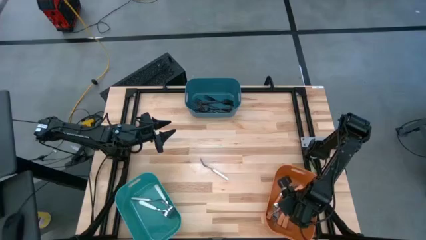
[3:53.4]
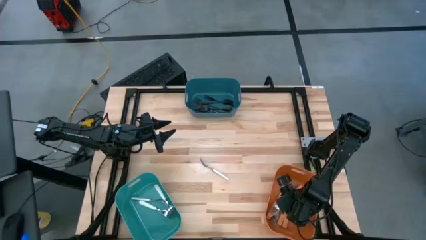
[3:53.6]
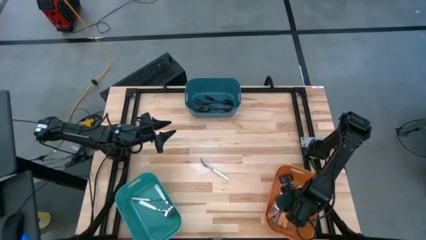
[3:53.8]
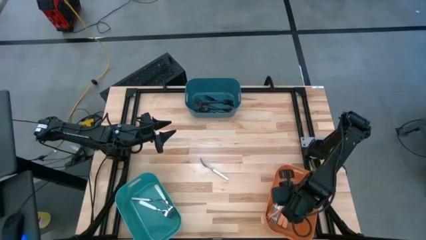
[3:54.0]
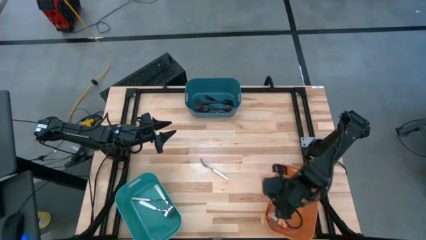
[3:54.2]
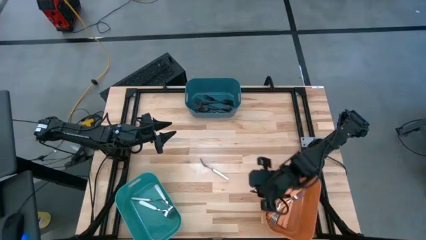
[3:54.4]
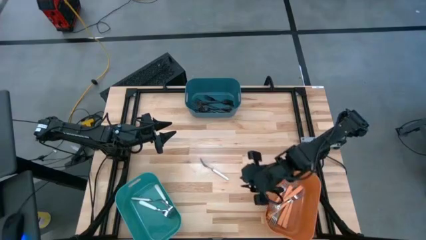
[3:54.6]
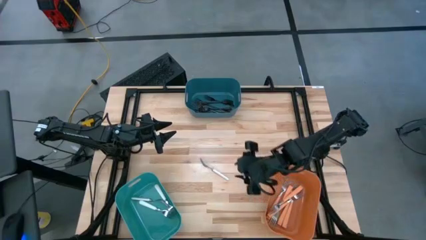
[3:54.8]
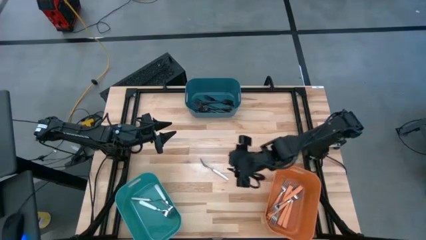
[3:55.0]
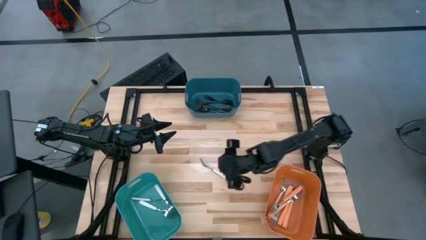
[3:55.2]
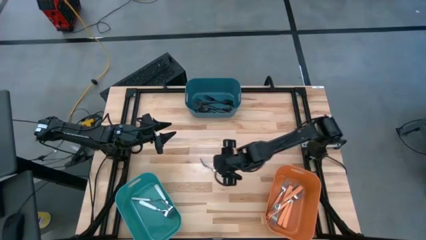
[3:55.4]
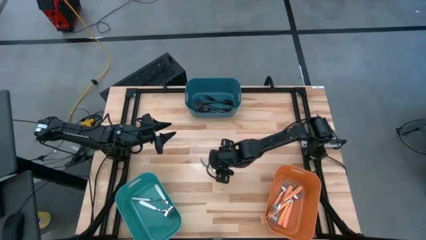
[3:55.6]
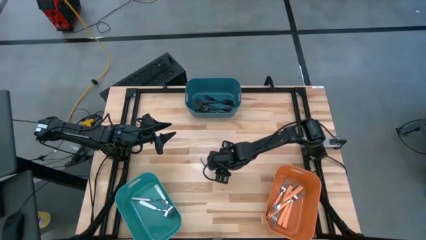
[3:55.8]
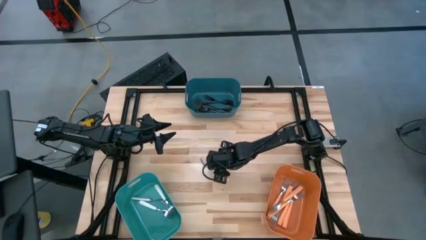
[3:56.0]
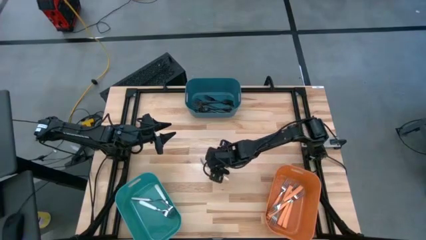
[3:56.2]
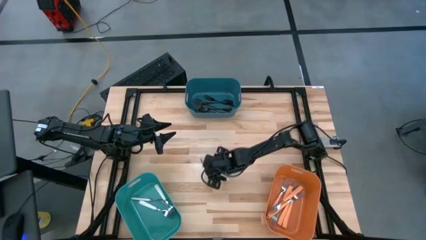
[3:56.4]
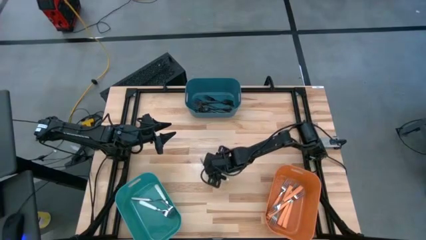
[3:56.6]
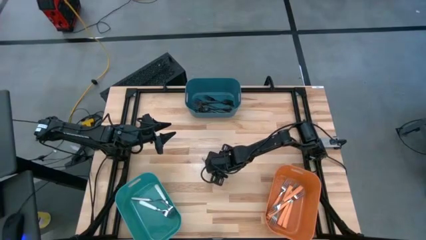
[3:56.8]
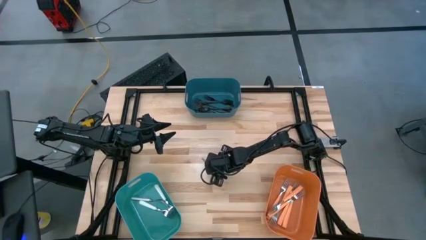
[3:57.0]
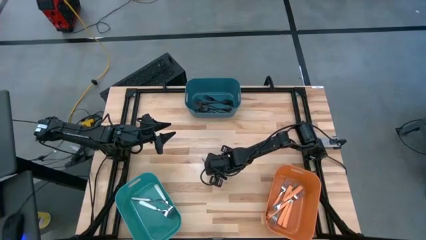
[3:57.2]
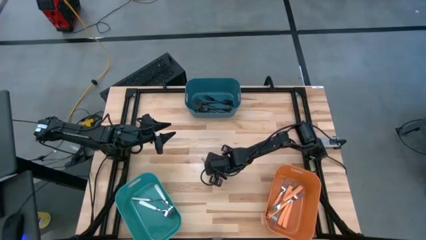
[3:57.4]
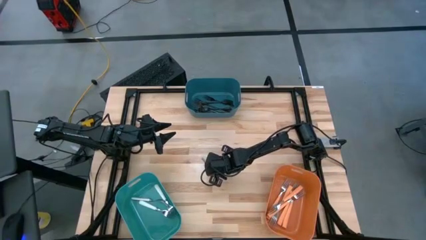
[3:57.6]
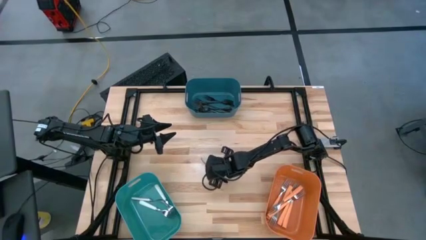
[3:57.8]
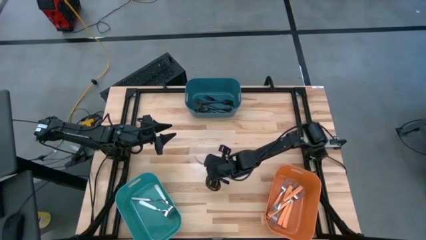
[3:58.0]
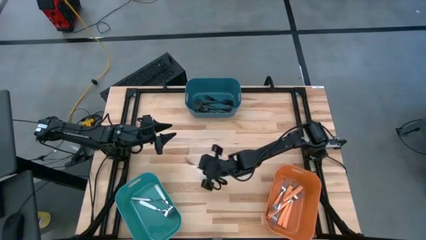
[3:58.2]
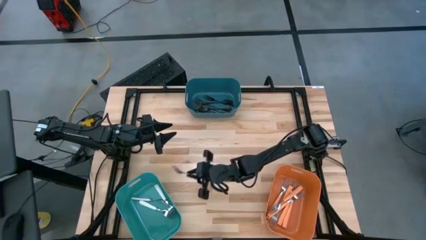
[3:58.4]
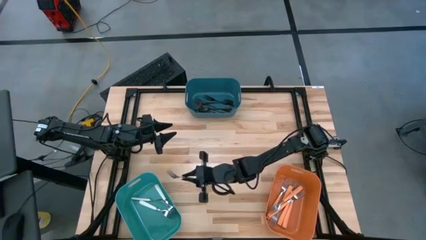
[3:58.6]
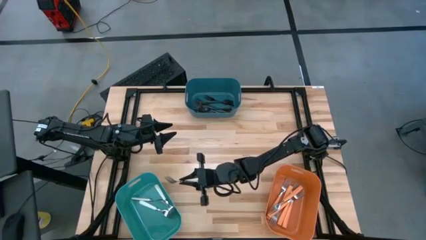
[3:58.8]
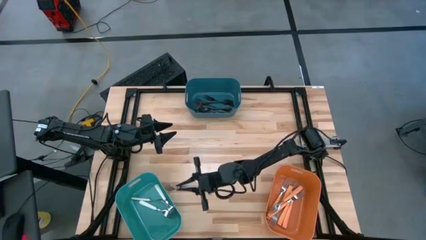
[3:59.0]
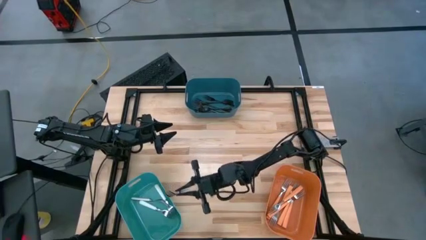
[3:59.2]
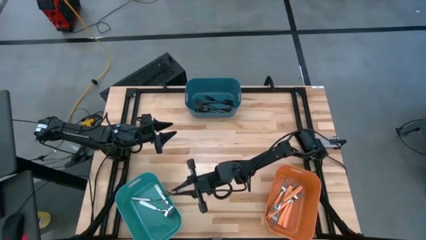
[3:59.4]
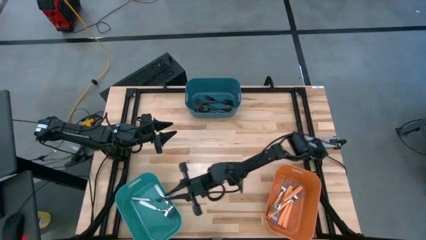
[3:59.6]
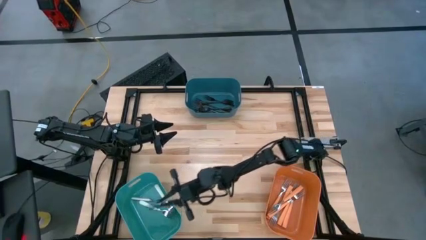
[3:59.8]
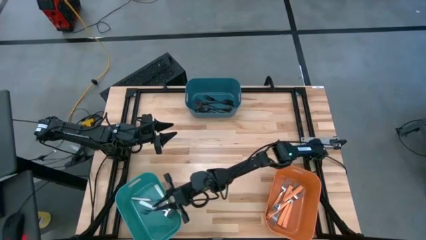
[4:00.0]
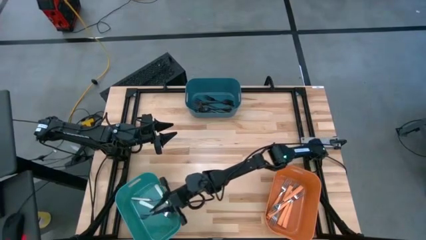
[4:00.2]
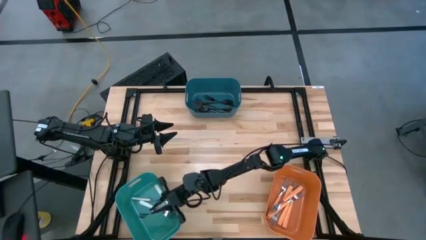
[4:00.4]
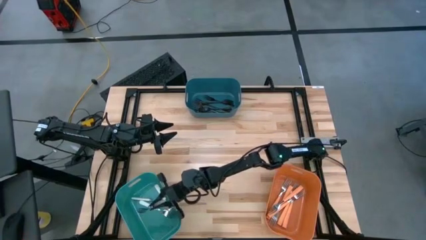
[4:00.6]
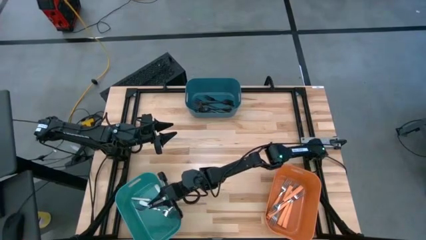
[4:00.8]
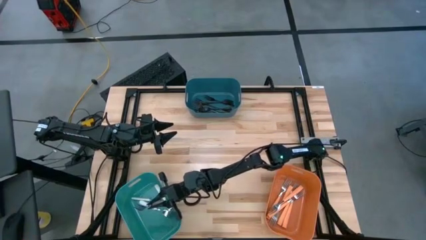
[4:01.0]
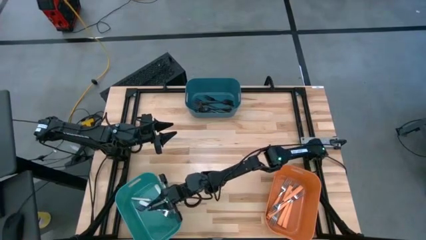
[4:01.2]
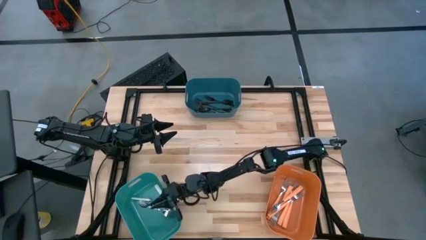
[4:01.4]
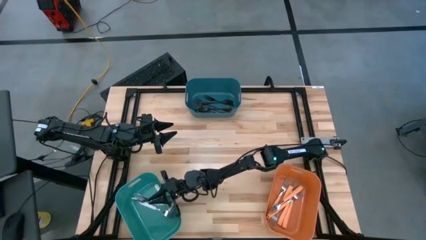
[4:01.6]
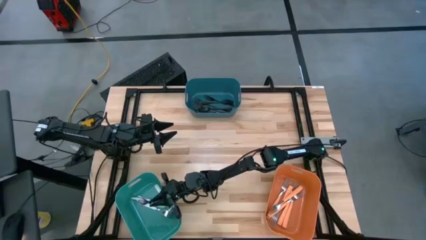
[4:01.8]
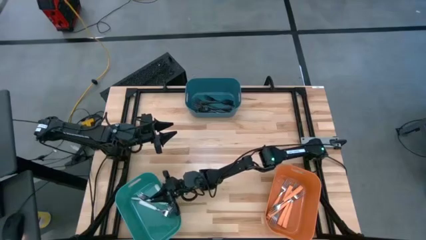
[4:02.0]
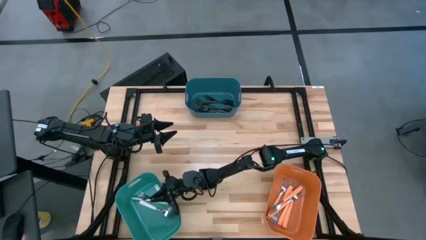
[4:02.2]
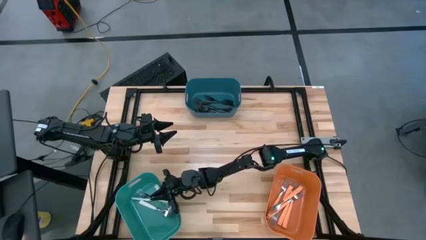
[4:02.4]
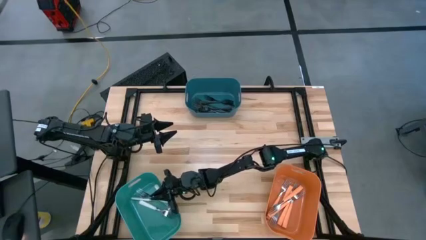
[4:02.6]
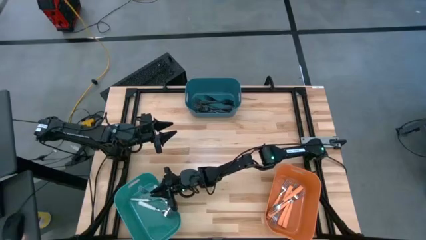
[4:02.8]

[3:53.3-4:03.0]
Task: Sort silverware by color (type)
Put the white fork into the green blue bin

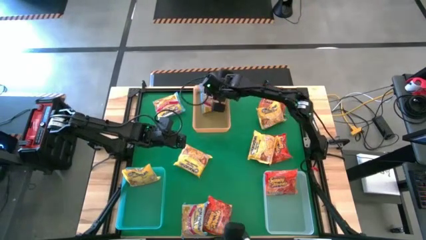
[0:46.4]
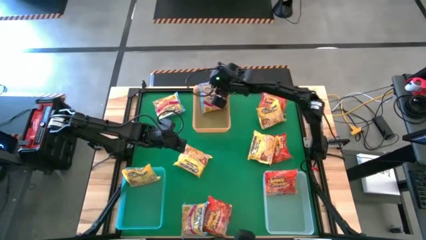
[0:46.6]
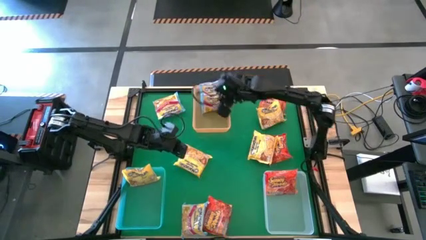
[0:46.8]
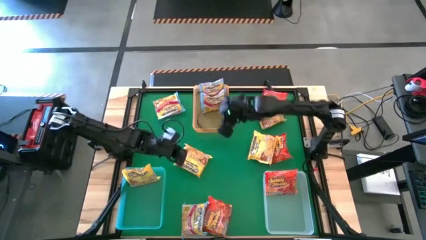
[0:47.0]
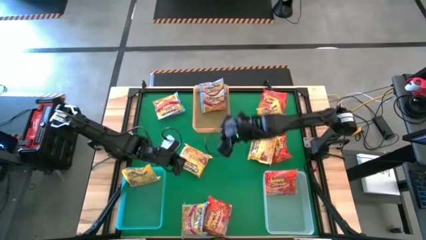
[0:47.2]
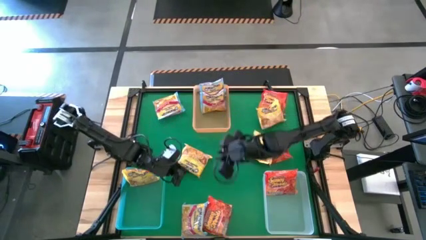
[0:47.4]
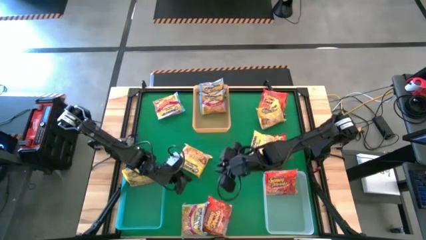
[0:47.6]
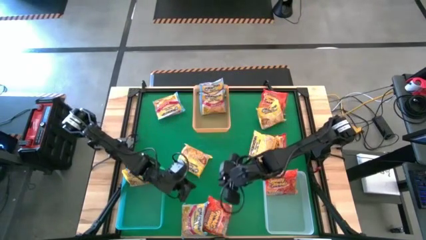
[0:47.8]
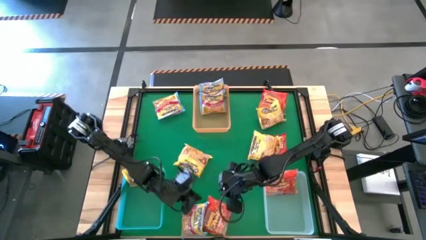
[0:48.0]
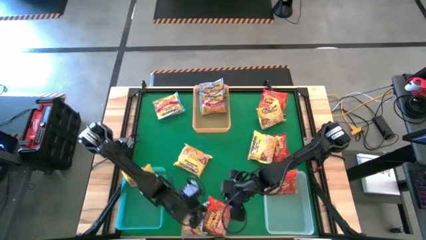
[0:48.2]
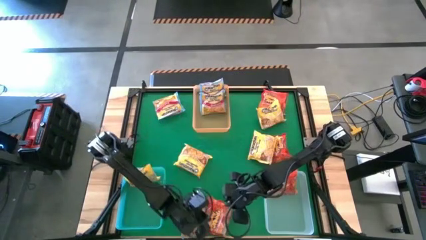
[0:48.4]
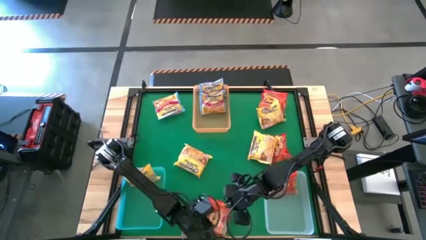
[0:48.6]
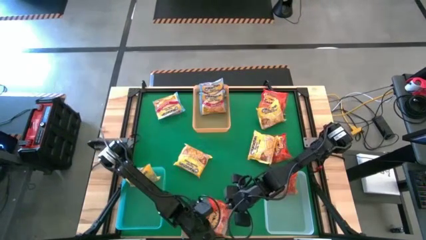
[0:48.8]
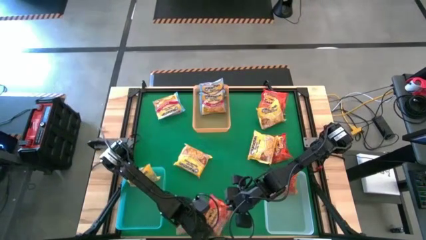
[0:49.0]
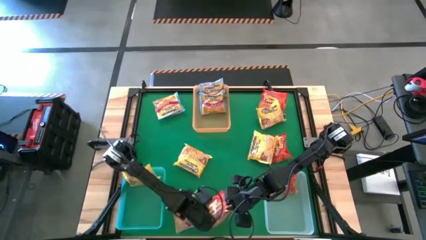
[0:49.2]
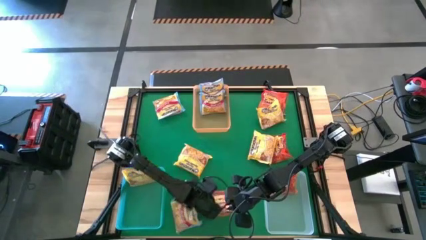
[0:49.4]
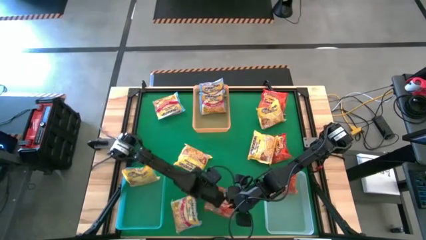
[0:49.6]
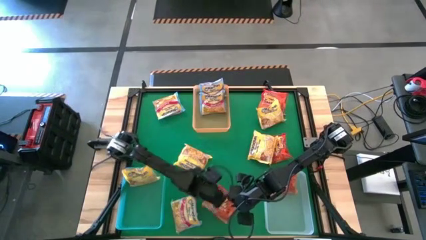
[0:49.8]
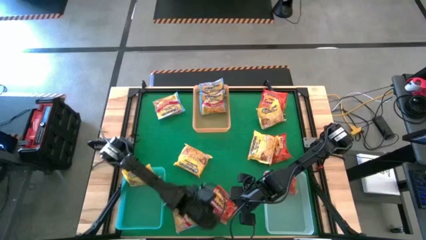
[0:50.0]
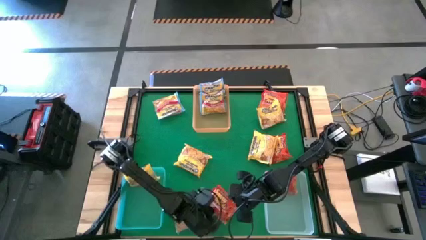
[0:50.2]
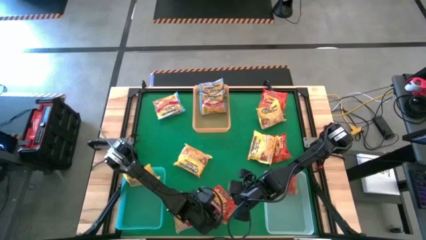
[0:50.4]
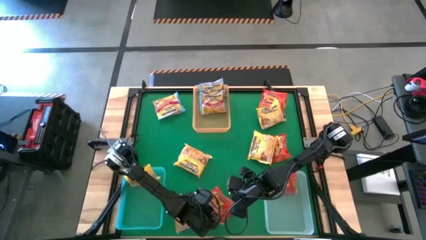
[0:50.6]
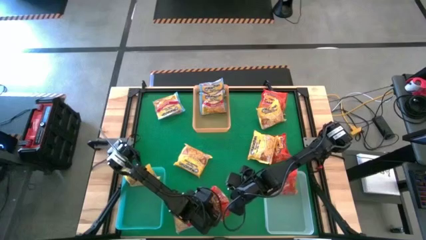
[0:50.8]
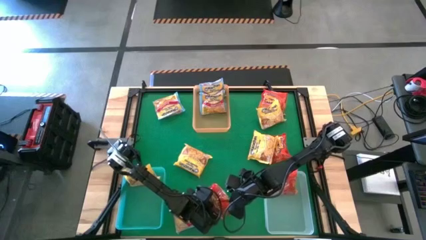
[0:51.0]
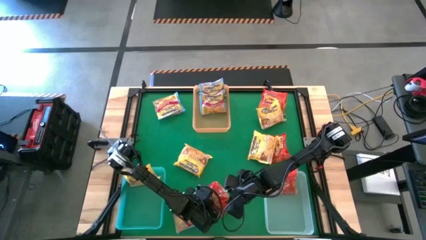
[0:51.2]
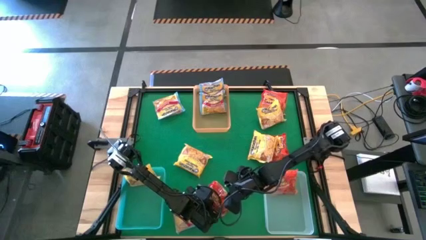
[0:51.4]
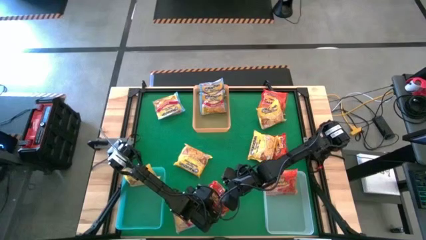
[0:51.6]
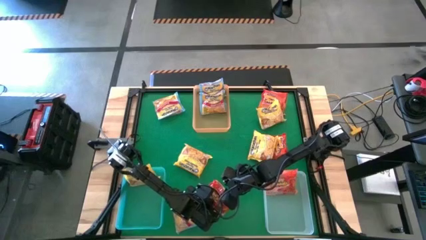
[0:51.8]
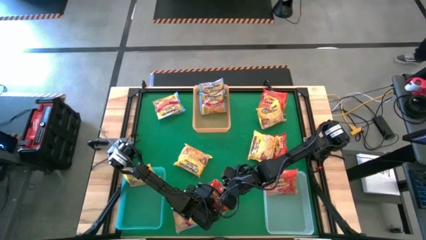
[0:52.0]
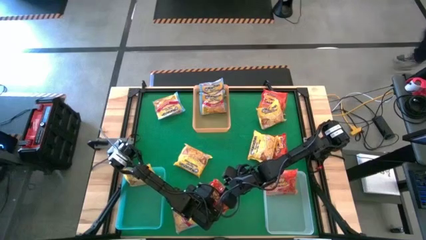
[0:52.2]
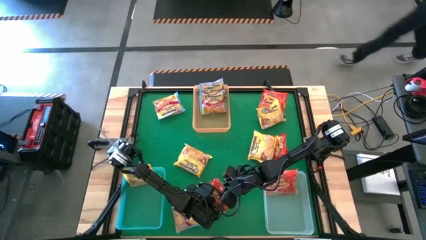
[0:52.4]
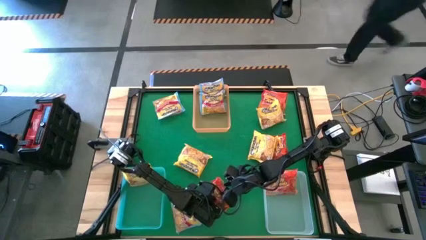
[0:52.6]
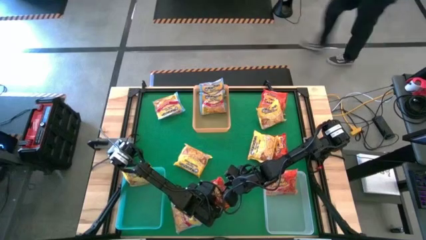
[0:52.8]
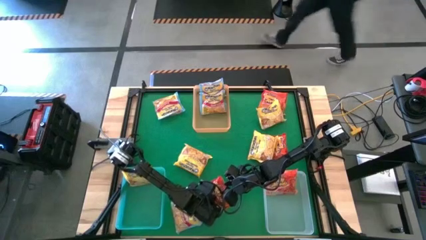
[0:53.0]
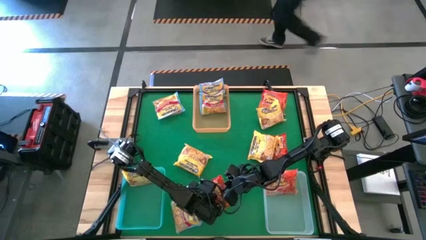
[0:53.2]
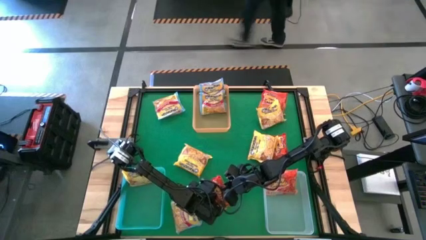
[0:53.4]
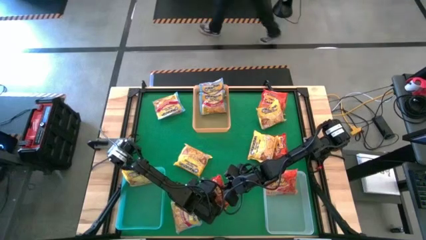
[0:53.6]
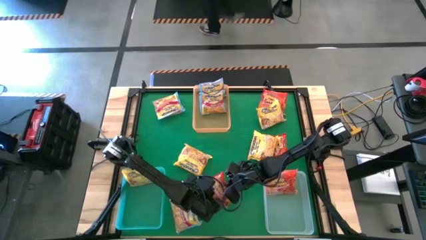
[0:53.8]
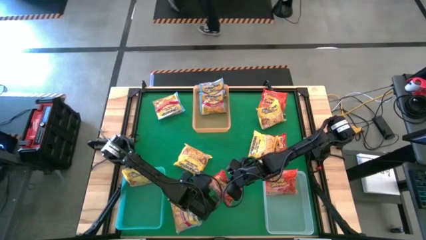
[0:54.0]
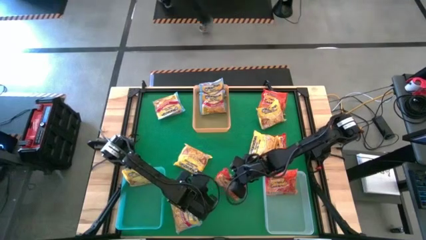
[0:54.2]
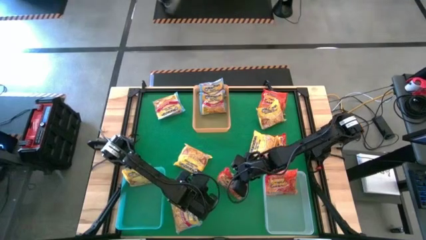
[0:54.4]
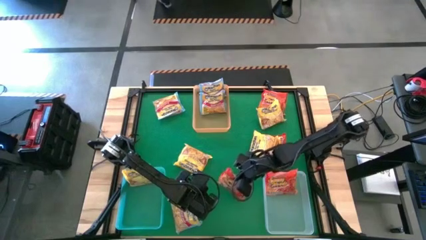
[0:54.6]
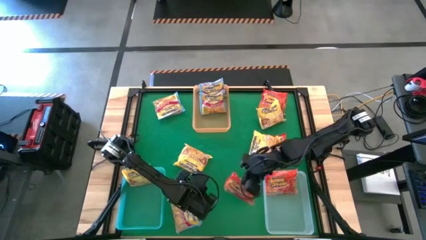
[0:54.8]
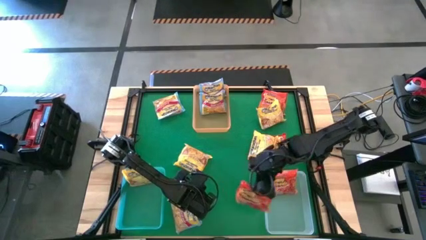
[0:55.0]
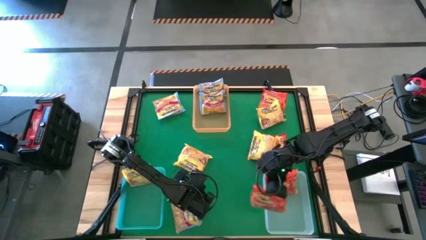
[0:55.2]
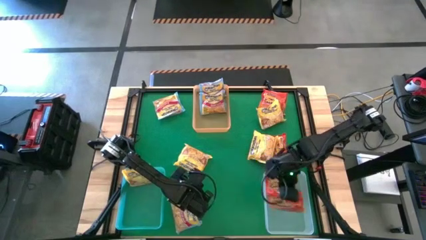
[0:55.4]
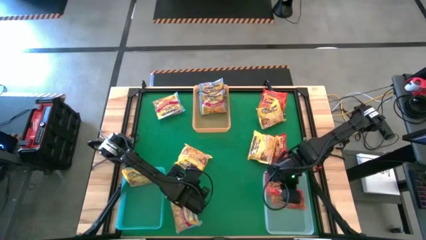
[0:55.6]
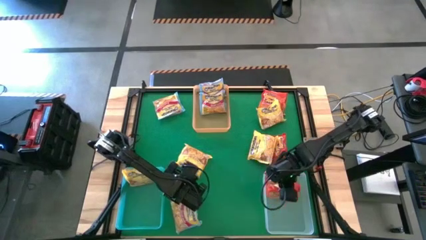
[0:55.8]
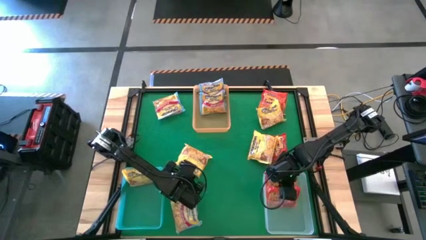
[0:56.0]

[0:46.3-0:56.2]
Task: Sort Maruchan noodles
Put the orange noodle pack into the transparent bin
